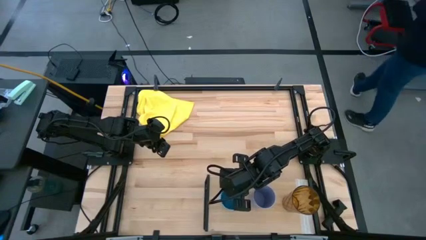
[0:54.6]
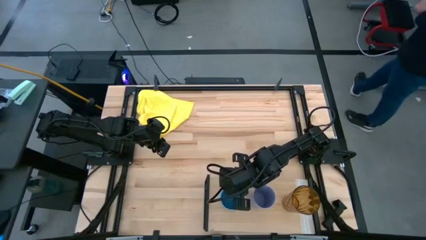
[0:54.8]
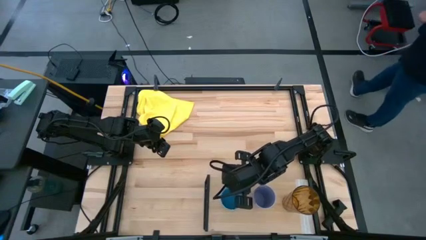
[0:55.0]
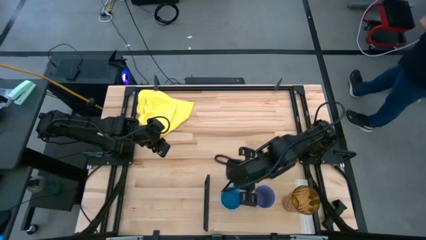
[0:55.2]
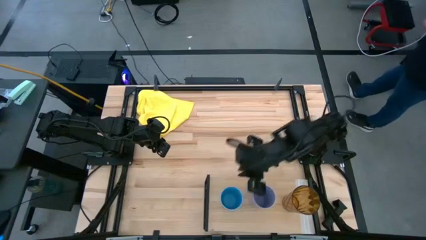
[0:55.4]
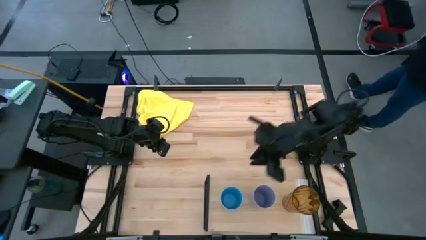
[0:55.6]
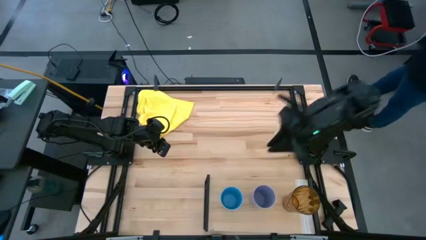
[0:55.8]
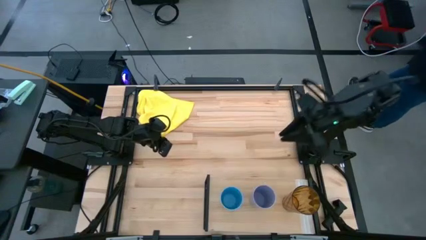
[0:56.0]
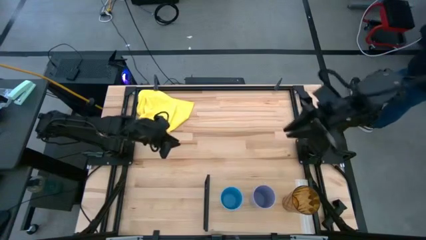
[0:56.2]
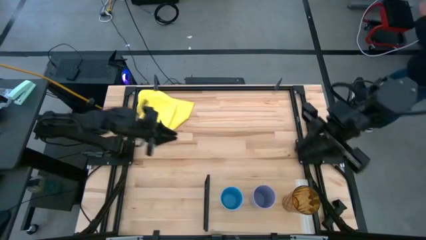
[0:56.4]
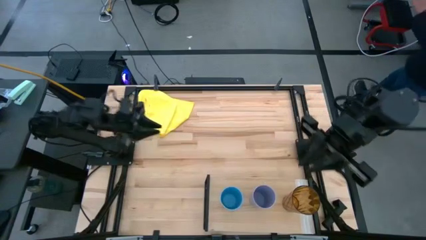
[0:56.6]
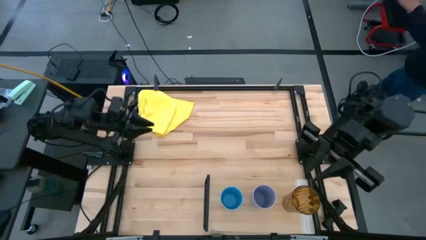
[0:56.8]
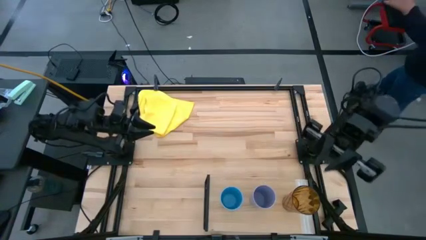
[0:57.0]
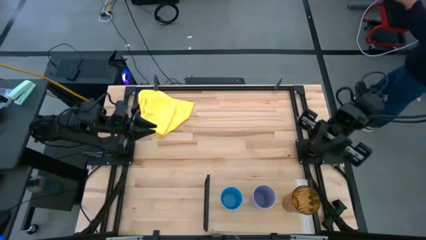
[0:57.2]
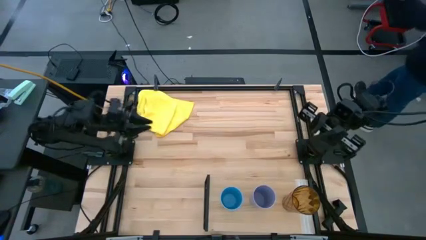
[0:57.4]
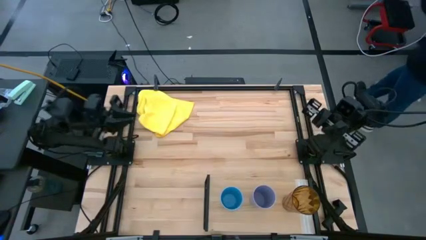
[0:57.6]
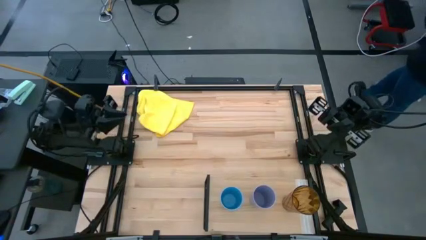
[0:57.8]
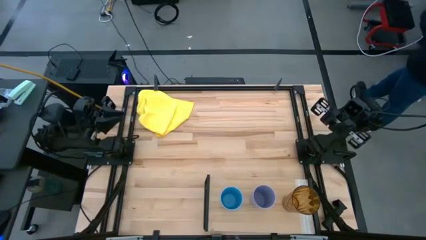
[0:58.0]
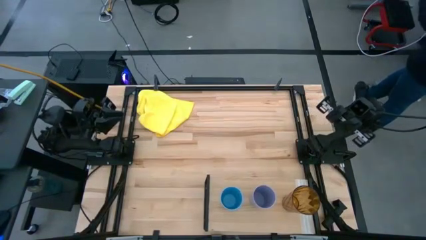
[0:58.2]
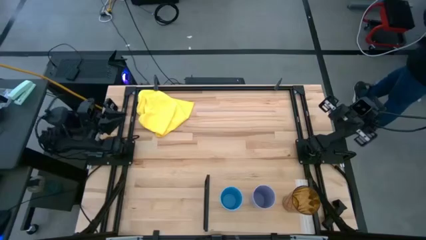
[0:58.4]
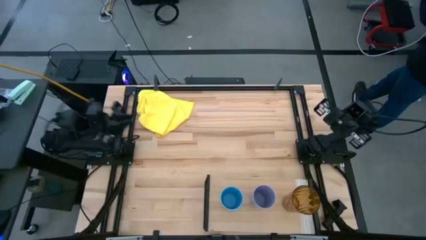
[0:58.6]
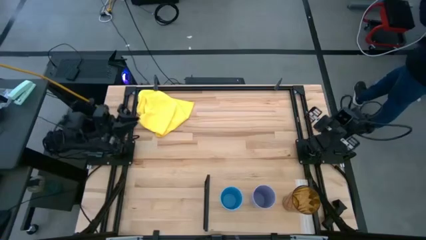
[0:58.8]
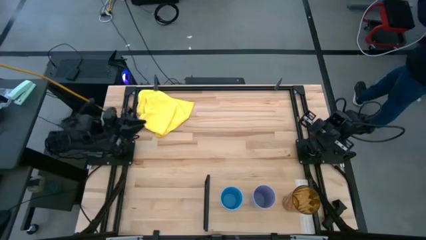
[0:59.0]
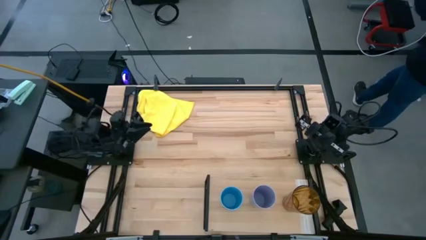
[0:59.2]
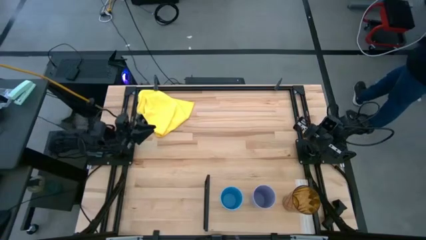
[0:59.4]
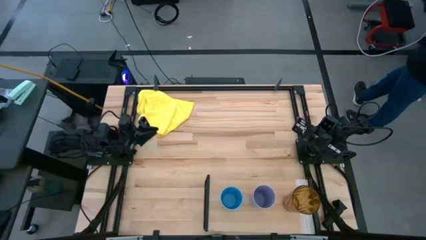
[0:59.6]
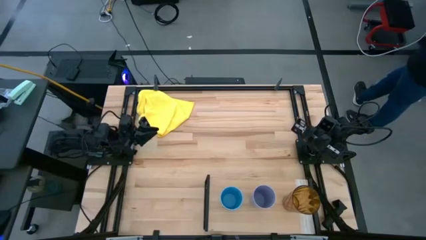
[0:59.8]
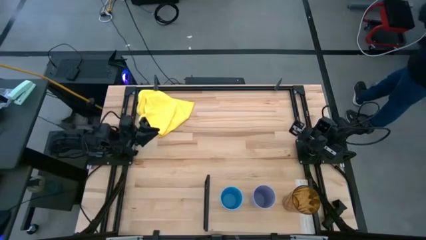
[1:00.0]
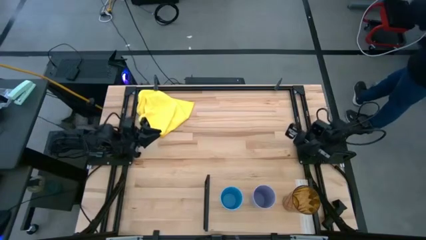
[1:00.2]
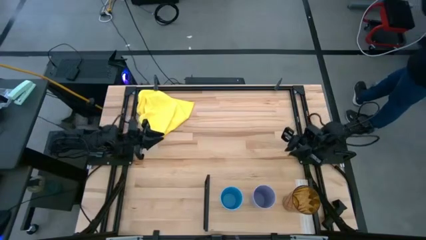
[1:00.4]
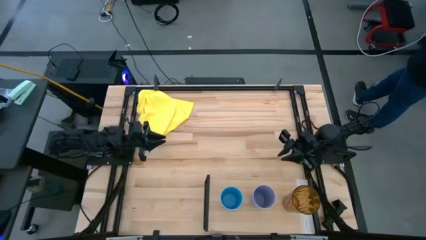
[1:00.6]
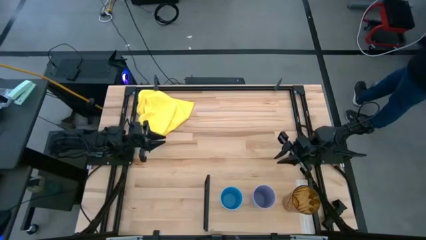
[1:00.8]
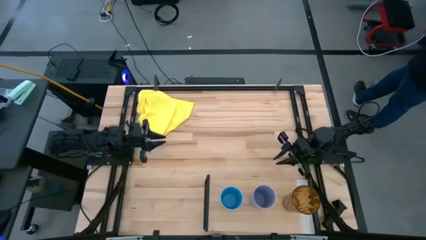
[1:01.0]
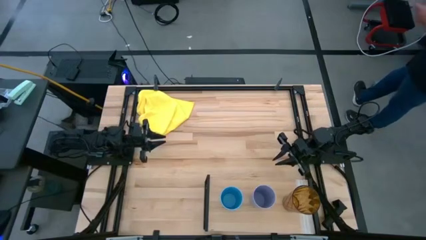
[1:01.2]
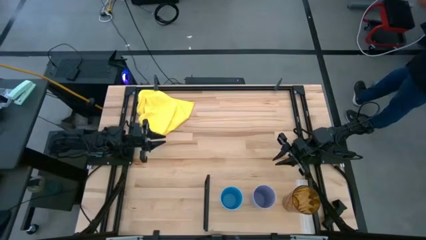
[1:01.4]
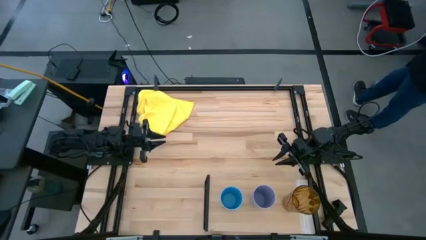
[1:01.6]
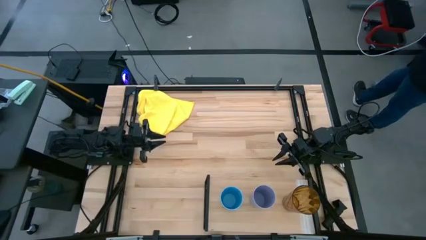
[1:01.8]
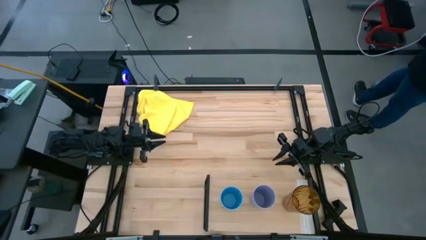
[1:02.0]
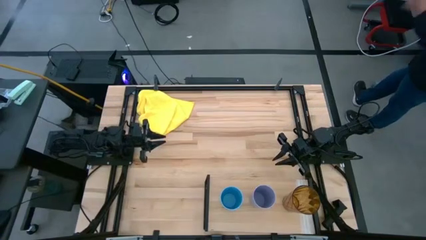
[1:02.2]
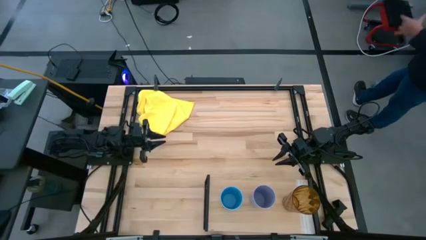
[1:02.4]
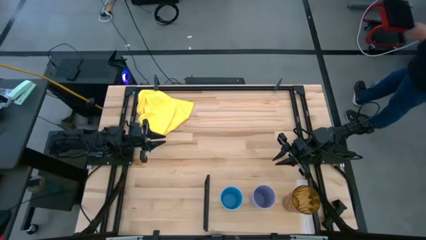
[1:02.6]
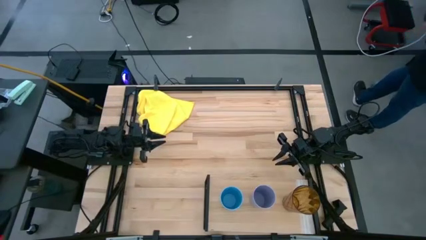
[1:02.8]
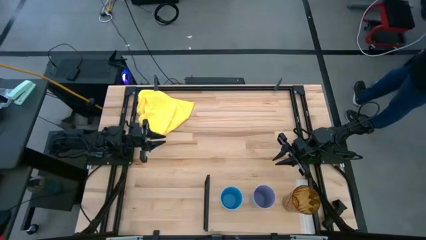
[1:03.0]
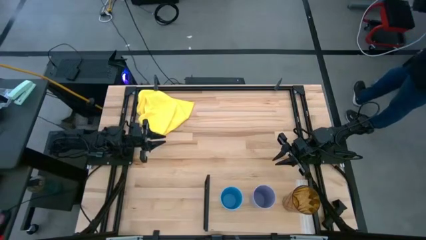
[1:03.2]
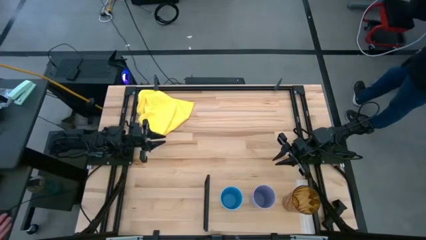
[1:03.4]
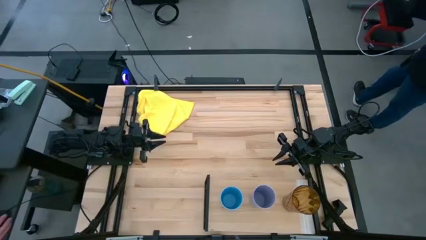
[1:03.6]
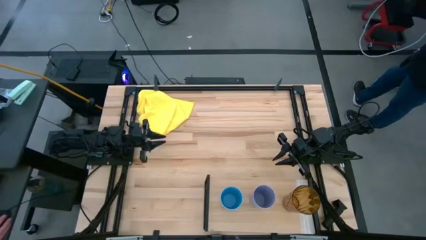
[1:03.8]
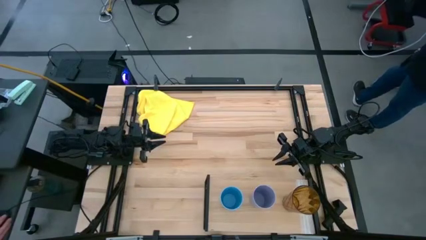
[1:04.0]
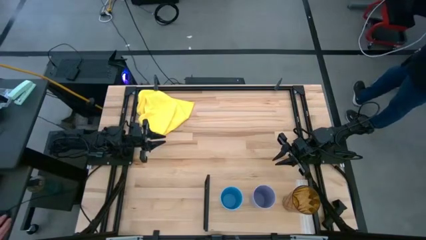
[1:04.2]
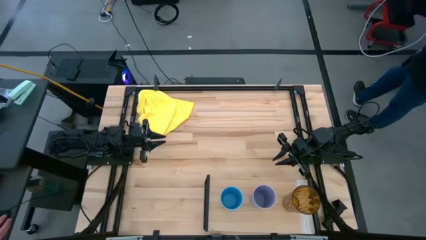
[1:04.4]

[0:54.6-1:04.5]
Task: Stack small to large cups/mugs on shelf
Return to Home Position

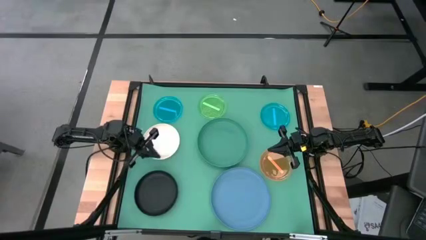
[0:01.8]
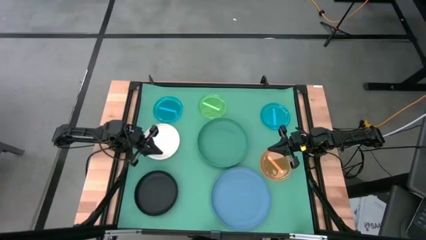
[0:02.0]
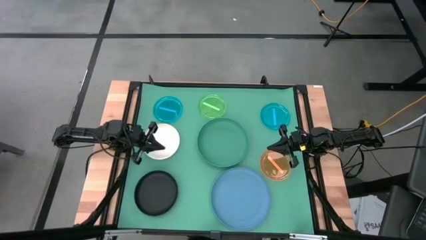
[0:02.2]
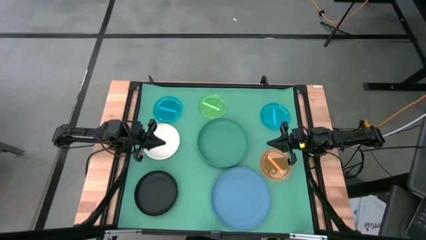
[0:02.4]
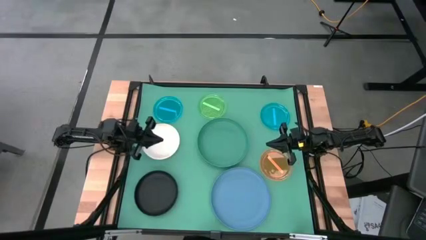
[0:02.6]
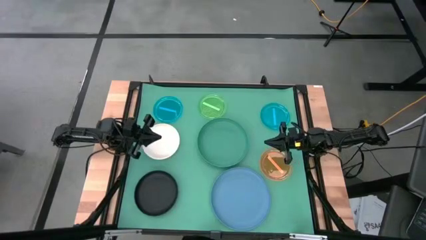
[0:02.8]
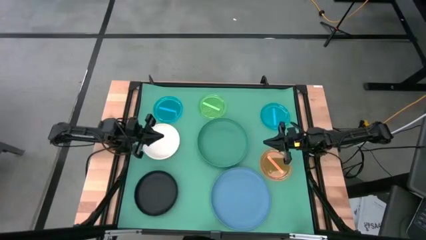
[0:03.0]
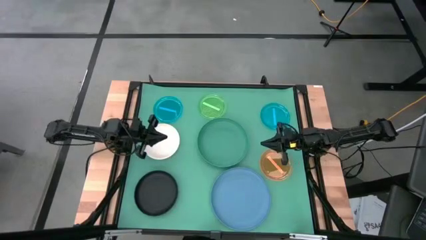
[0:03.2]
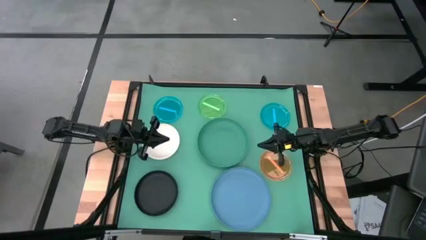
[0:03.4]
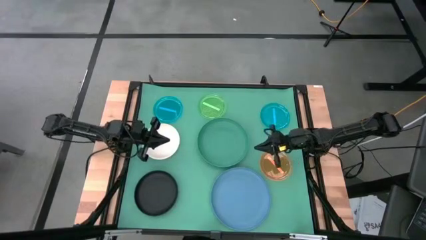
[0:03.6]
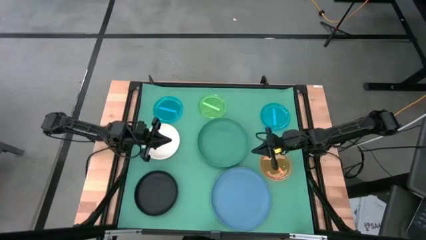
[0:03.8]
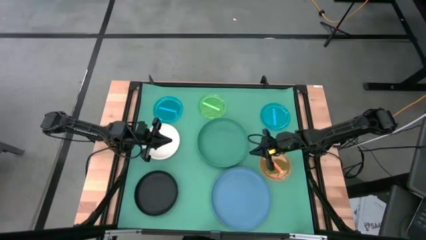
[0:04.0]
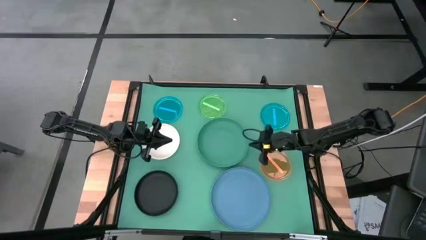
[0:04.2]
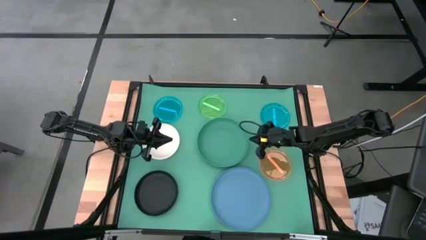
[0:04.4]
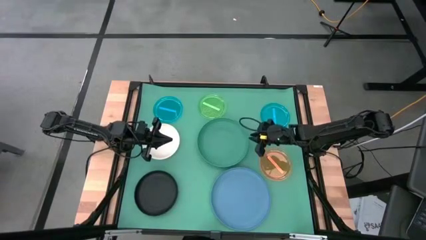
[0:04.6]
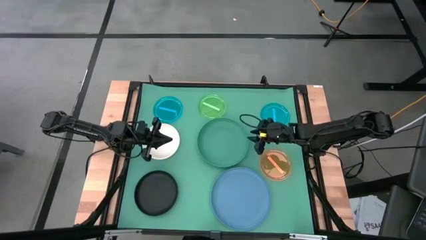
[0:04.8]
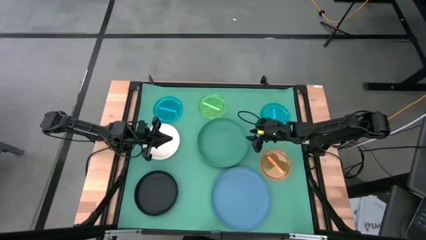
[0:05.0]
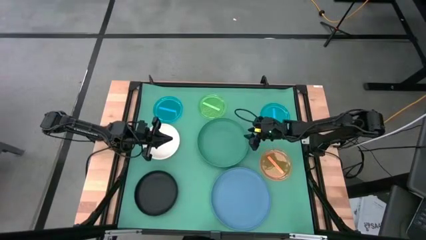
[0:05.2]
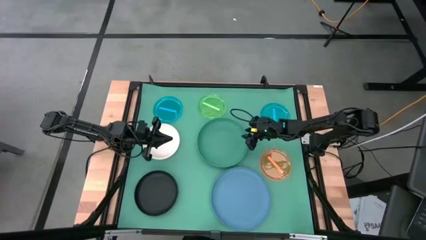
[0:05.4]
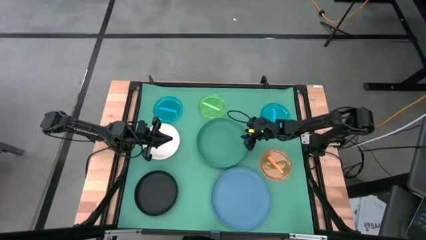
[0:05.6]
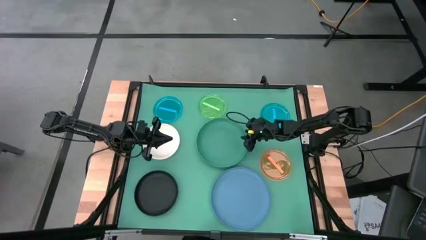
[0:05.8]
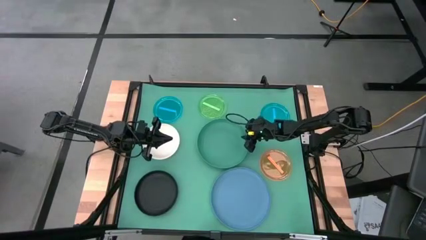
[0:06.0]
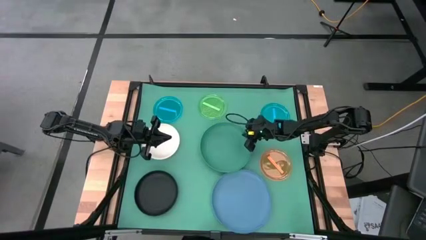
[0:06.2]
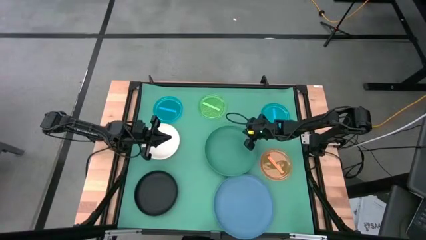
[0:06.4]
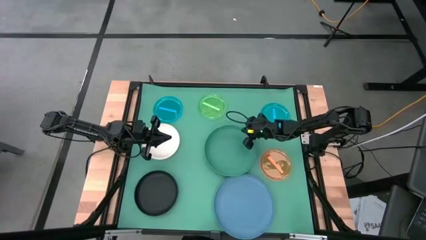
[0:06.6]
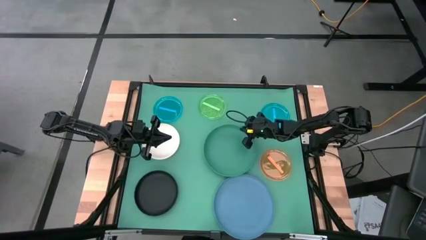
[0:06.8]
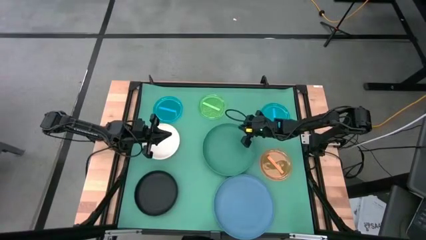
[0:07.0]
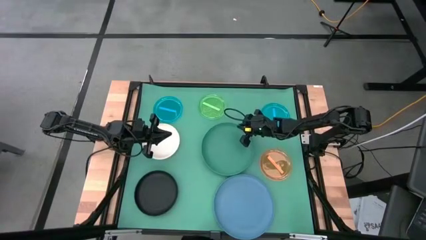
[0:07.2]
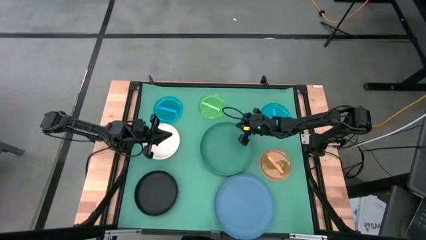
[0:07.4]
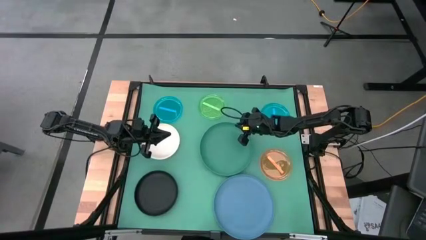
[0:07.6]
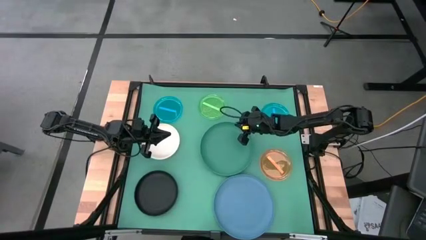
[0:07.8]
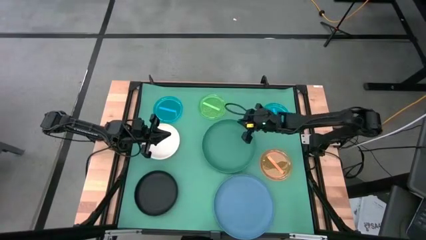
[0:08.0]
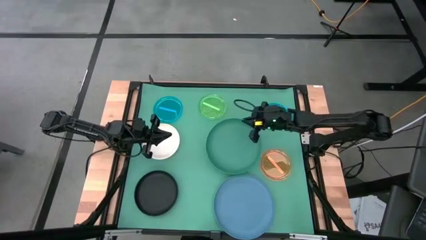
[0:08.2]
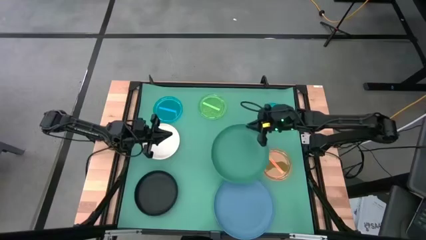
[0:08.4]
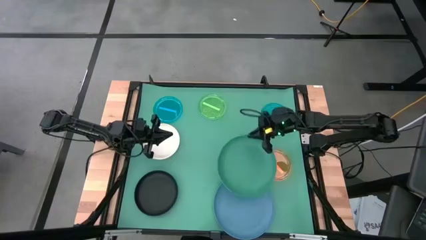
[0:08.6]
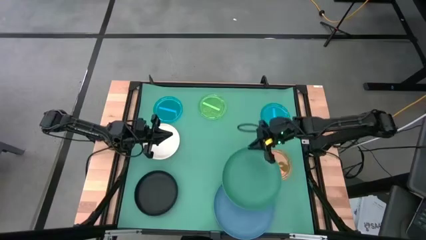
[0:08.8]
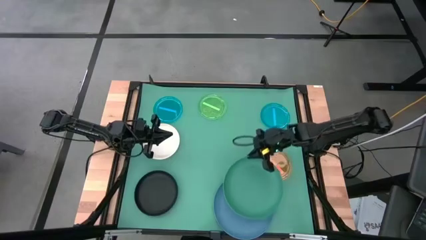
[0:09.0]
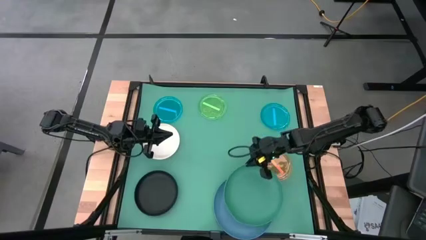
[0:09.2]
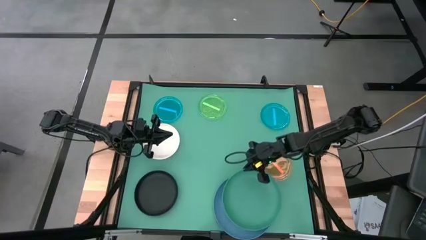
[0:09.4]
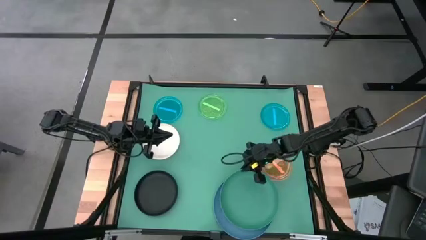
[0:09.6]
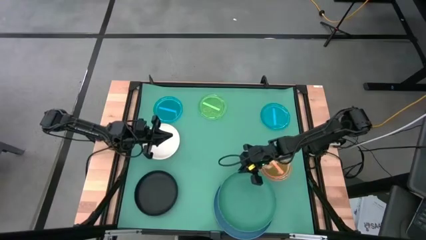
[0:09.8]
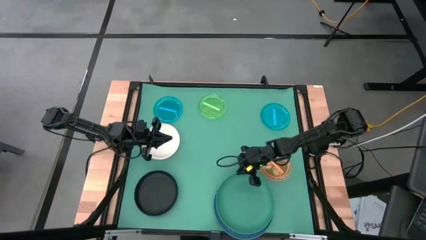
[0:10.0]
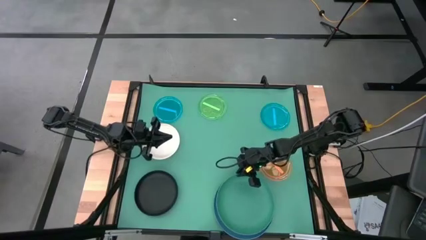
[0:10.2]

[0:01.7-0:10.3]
Task: Stack plastic plates
Stack the green plate on top of the blue plate
